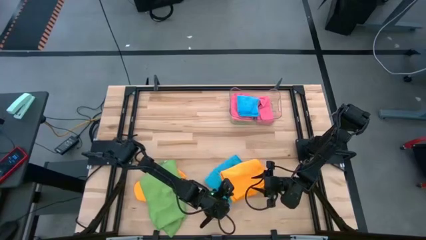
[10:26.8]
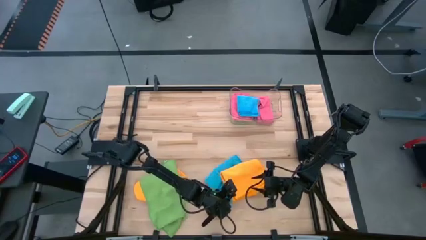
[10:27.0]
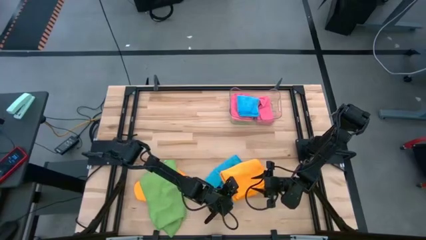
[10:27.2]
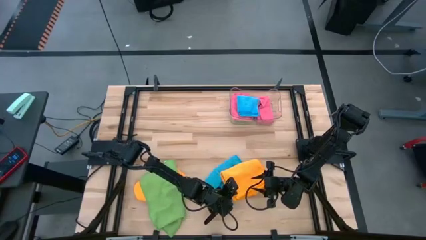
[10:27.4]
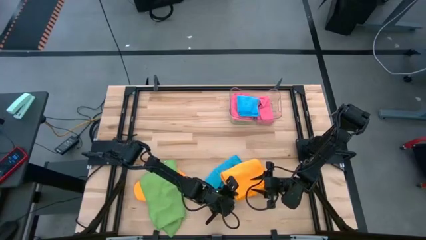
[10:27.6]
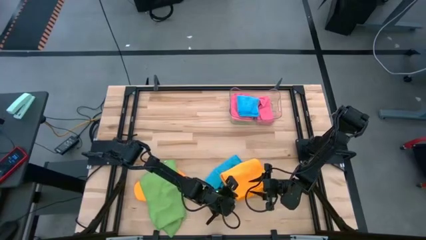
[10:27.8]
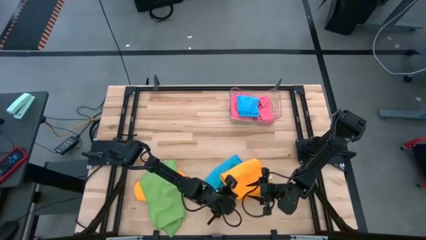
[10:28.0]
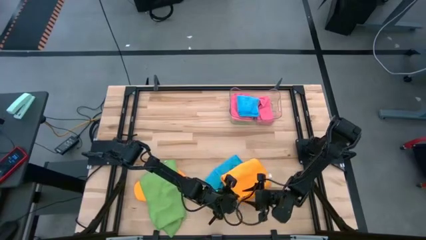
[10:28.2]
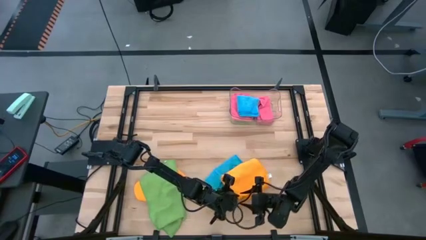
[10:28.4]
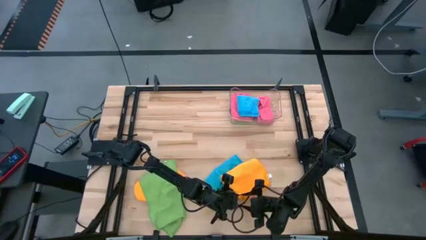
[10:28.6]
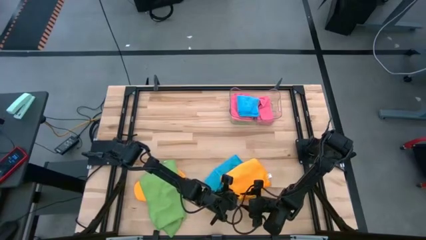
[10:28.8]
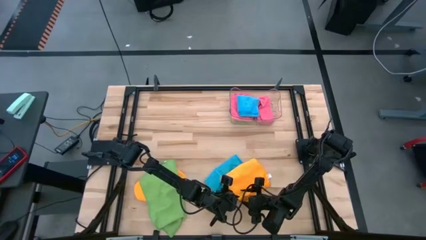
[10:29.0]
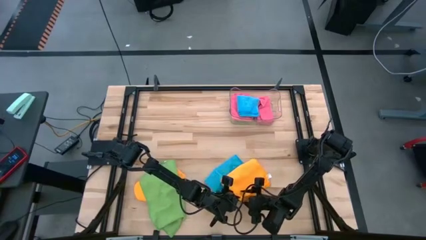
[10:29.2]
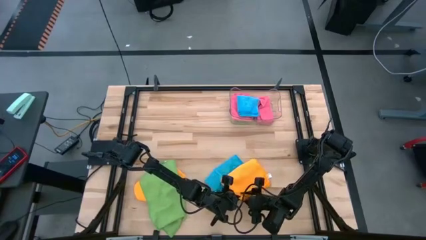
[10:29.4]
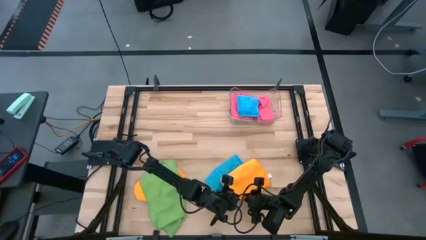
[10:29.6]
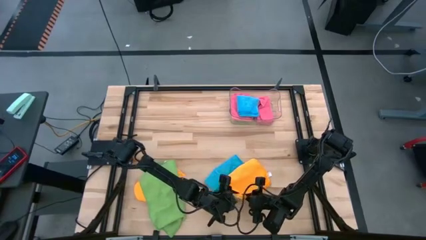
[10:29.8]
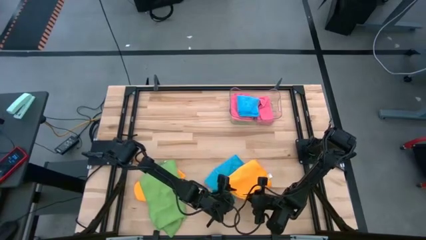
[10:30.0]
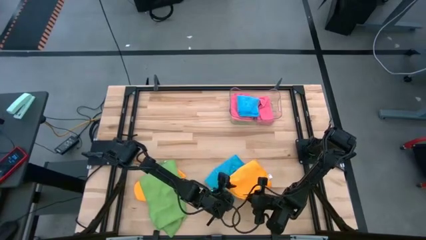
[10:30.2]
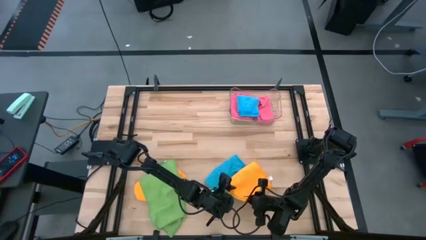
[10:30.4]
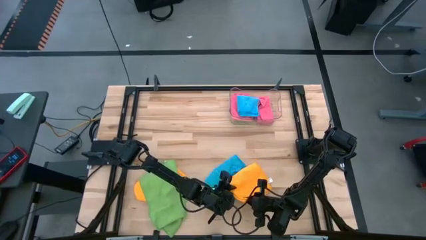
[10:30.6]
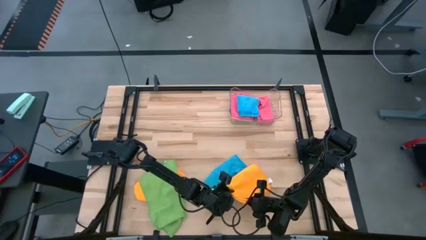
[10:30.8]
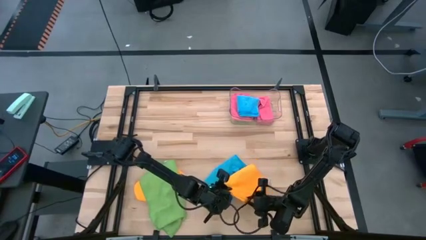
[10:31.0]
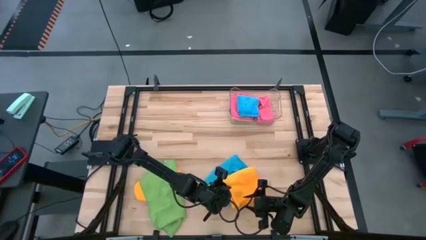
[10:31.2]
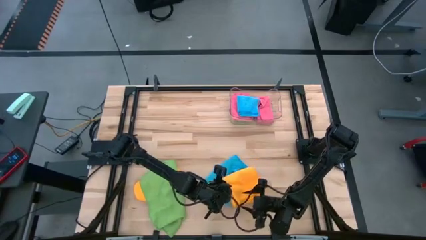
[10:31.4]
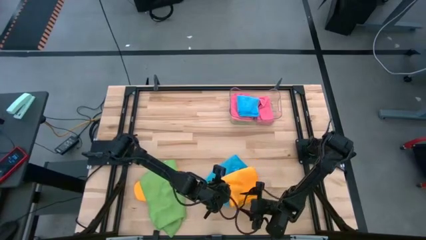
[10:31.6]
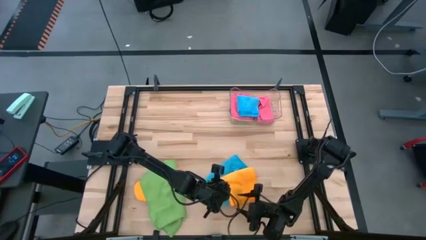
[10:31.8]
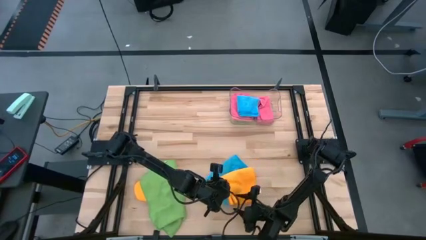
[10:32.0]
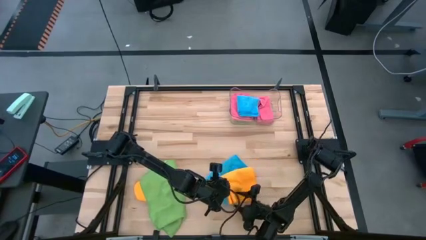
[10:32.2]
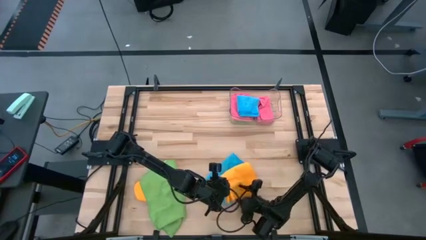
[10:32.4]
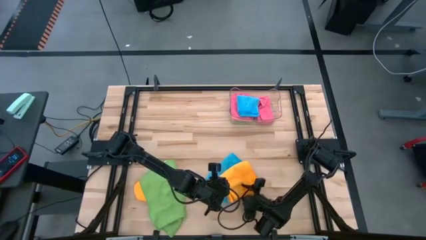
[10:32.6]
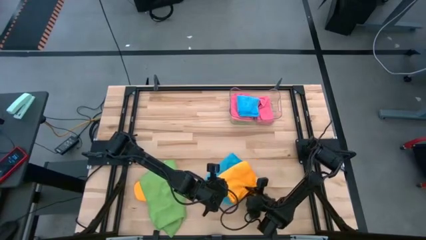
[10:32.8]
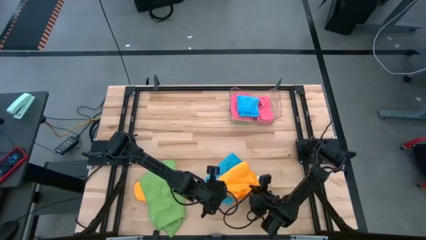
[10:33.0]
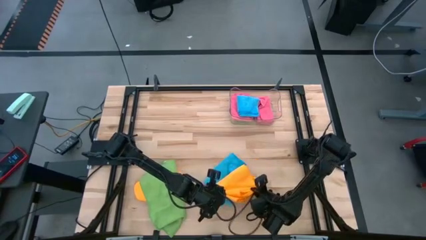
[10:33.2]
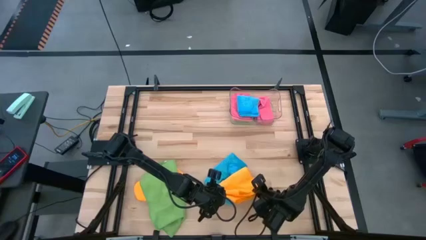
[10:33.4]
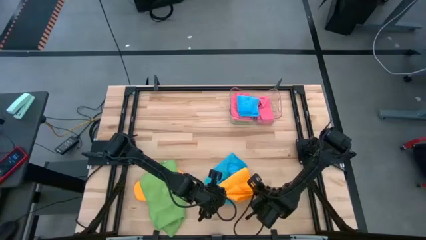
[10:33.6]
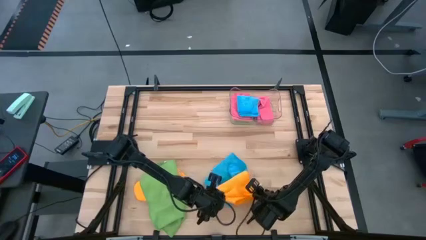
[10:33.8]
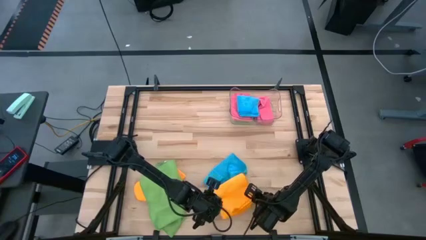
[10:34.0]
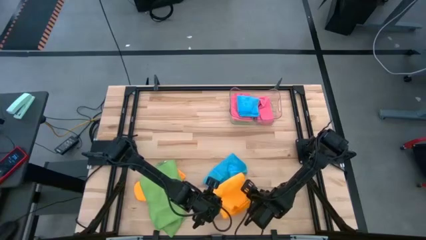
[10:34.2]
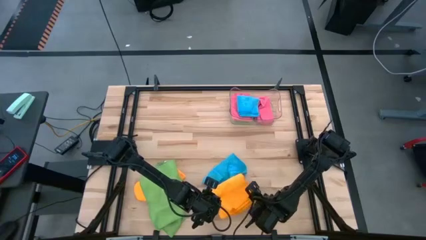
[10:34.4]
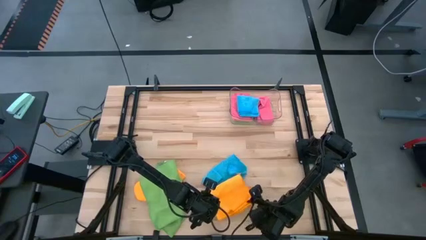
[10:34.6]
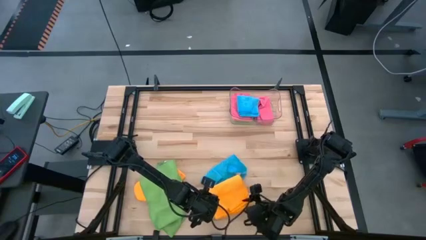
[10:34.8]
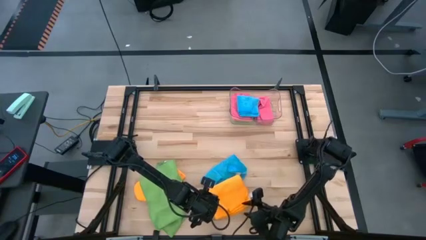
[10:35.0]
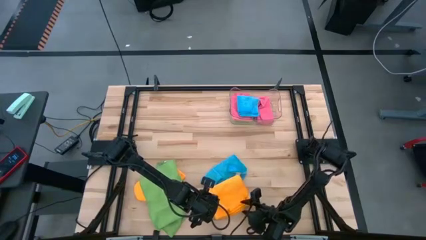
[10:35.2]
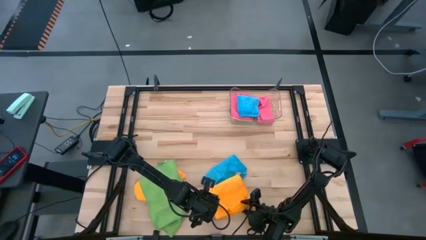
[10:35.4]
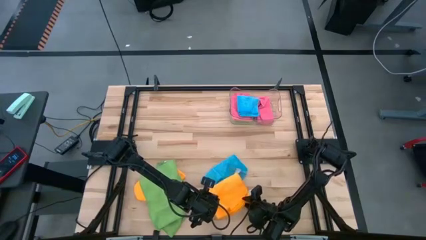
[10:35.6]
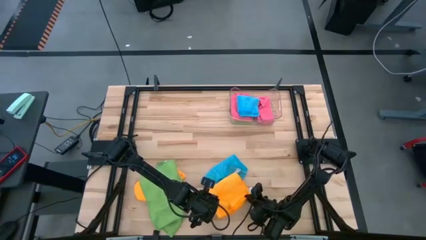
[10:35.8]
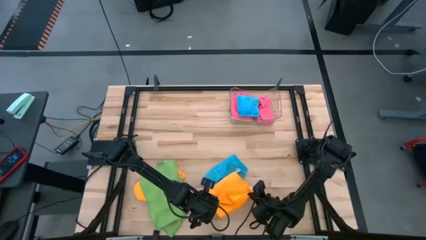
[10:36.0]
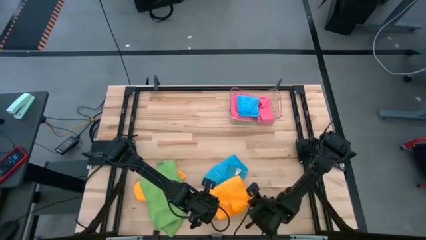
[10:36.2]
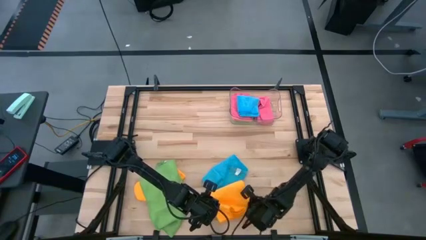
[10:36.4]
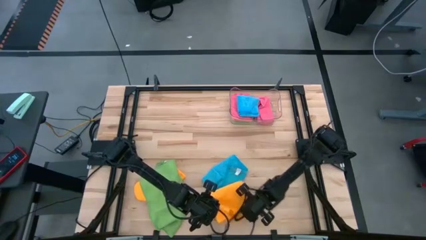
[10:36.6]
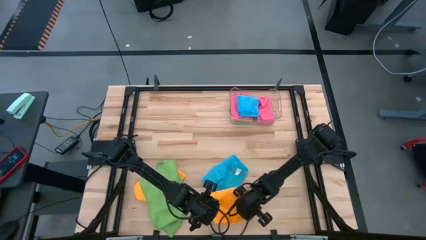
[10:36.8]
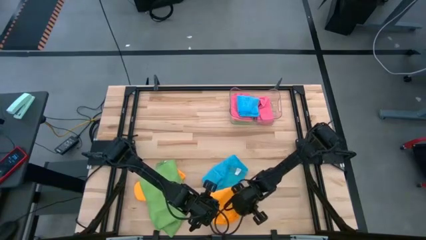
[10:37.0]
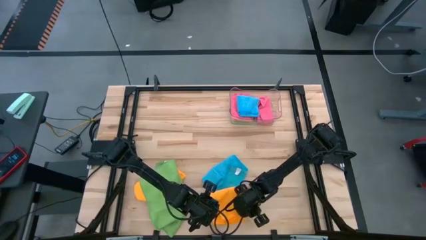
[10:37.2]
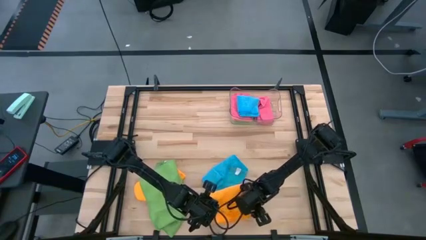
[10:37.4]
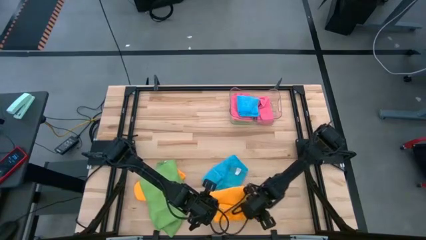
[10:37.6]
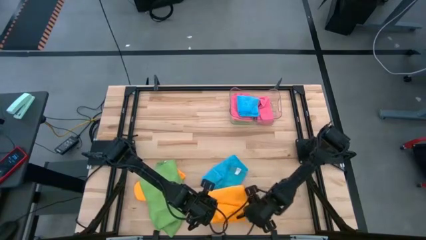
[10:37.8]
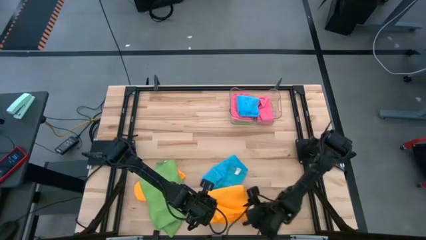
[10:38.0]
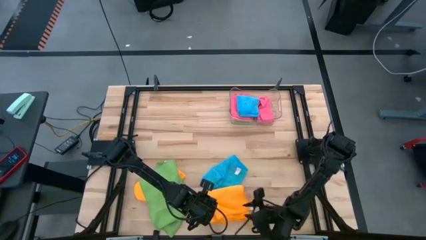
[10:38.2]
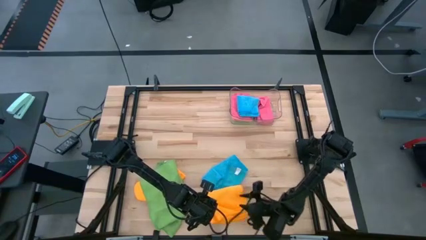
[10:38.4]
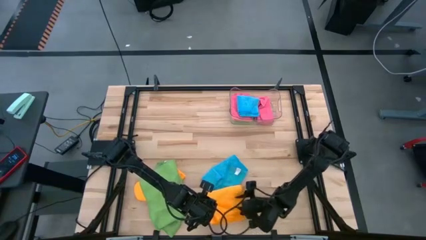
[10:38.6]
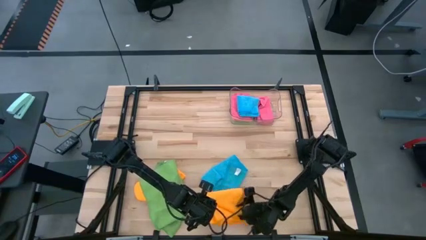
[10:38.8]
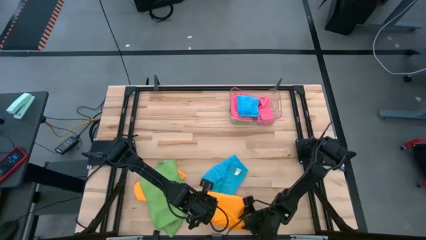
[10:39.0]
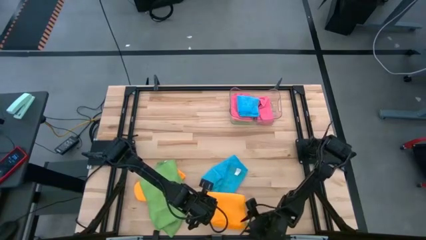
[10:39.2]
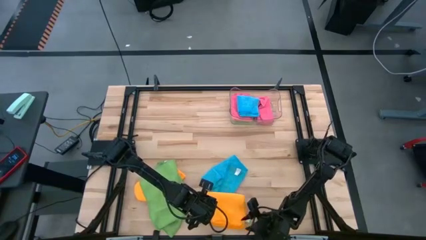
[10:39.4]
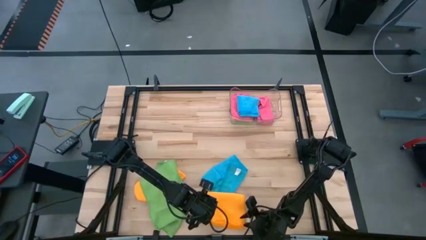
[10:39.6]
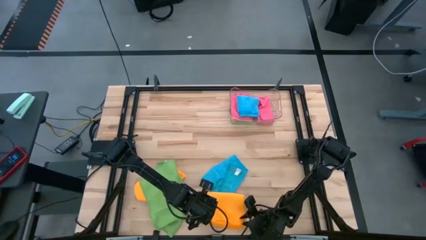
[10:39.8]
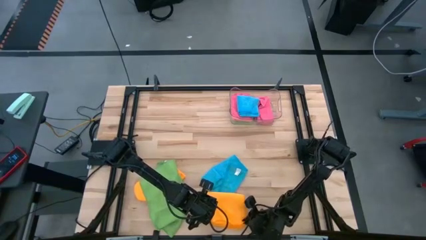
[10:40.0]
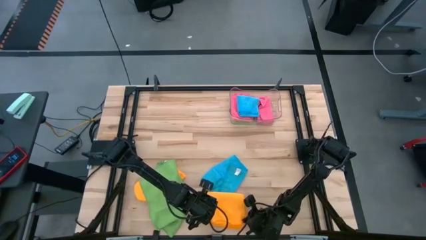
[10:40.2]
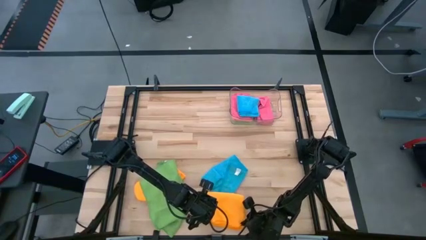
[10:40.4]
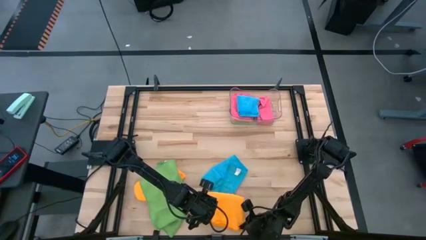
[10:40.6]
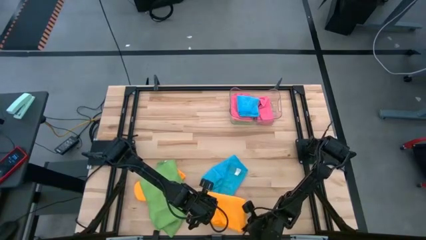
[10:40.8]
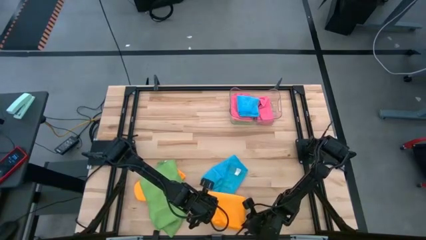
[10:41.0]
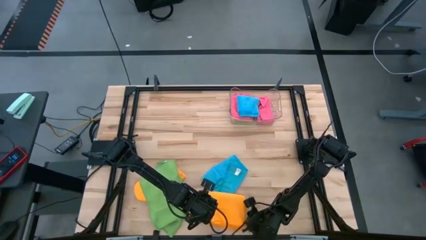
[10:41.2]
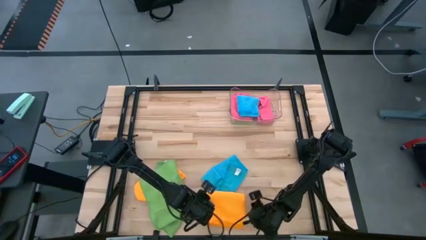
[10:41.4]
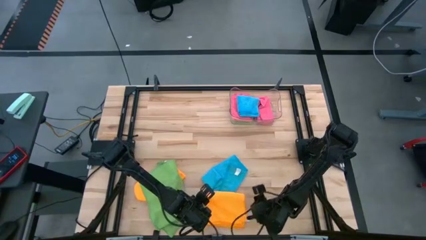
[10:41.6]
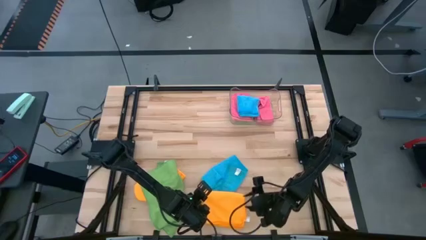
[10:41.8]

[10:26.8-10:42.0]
Task: Fold microfiber towels
Fold the right yellow towel
